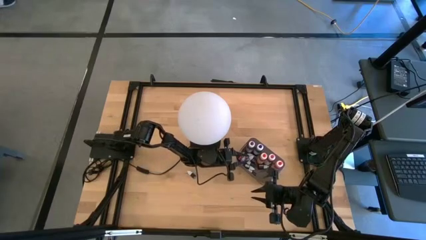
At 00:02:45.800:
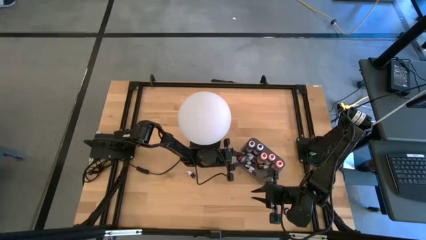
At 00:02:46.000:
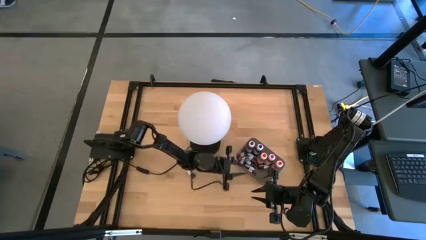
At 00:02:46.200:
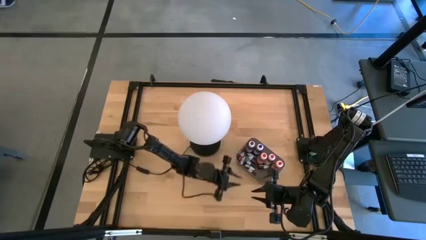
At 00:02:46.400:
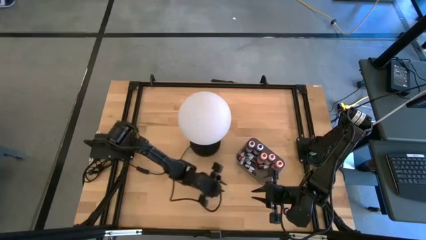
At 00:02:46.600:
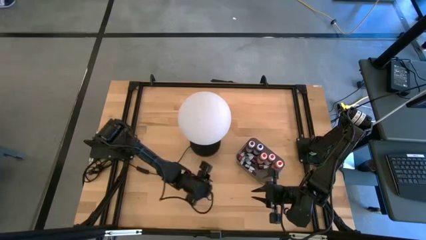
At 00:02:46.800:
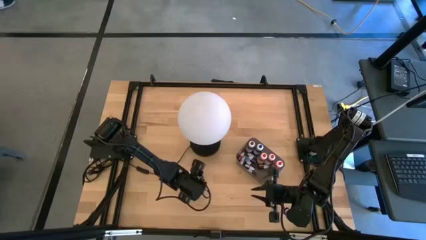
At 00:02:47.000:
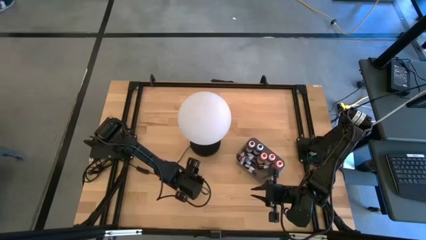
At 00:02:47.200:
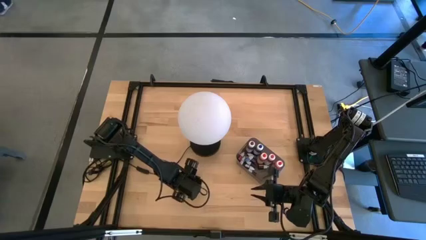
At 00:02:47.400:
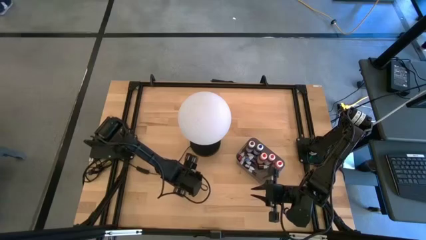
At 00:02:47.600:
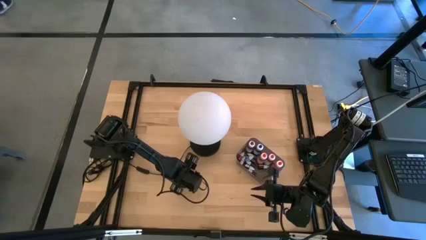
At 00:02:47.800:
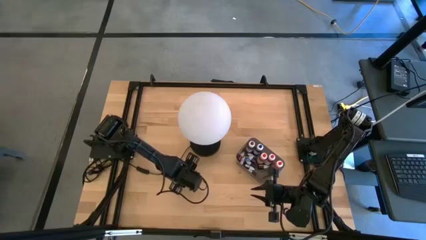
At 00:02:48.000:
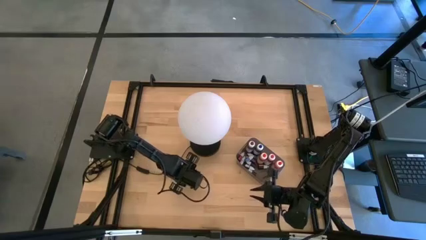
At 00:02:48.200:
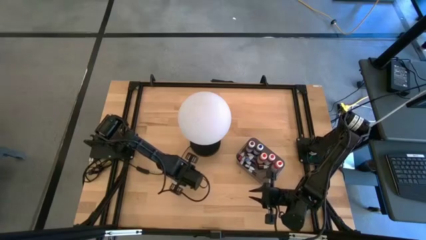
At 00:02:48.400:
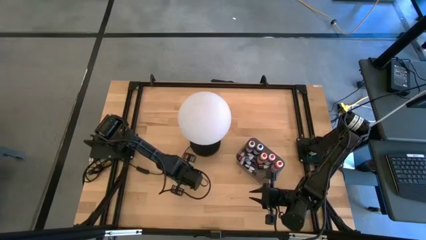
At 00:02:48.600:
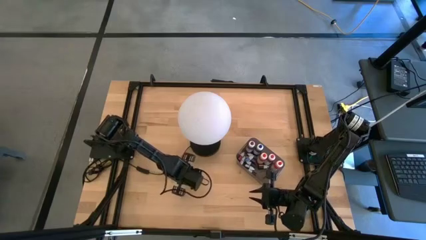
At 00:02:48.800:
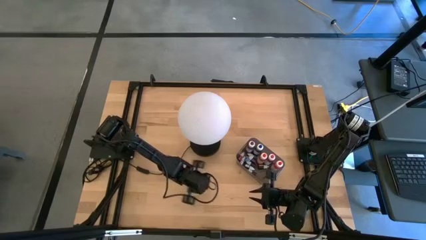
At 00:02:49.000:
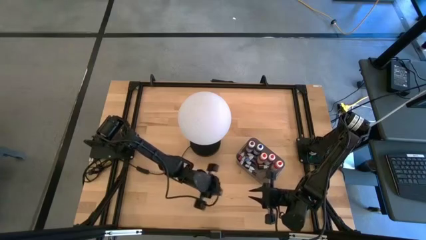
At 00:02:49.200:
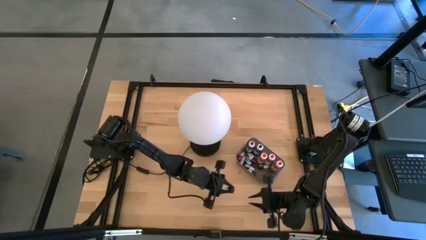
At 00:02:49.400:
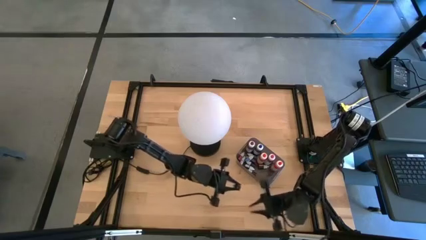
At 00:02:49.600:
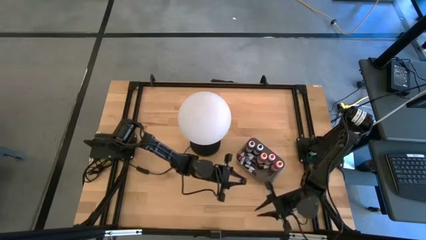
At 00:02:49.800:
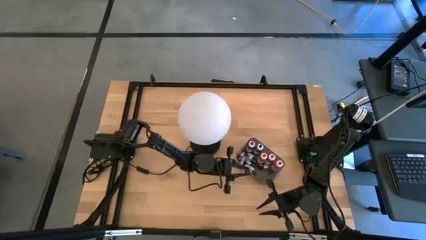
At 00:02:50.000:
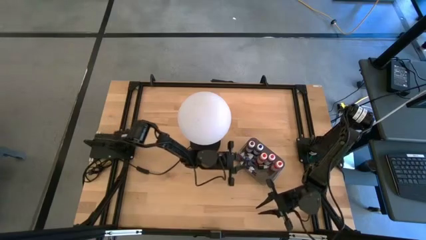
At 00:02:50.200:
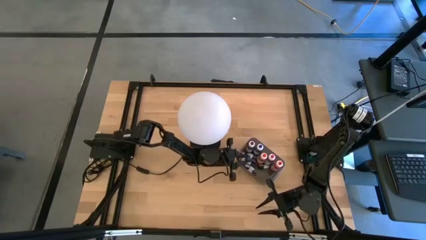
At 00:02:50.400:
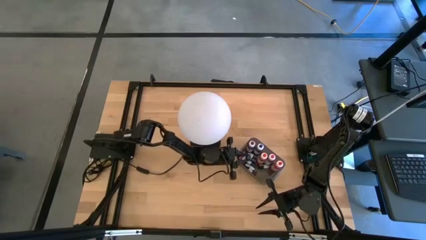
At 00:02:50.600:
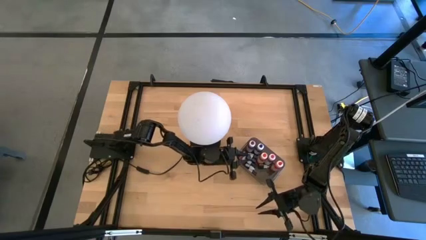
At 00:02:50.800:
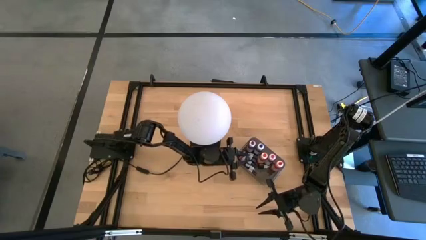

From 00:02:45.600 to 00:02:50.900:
Task: Pick & Place food coloring
Put the small green food coloring bottle into the black container

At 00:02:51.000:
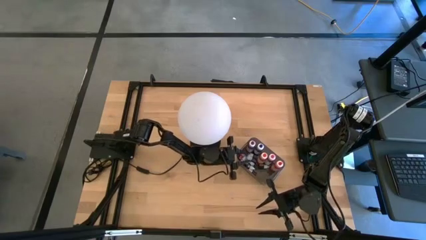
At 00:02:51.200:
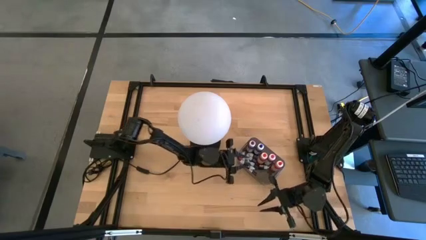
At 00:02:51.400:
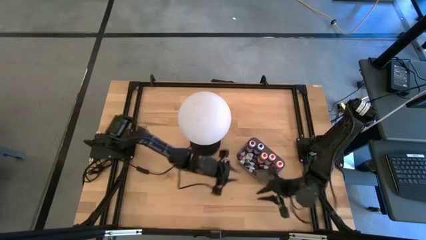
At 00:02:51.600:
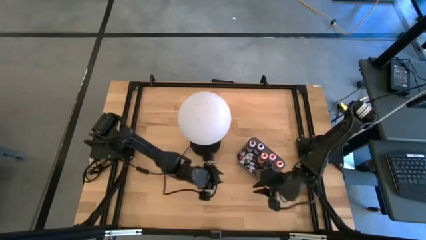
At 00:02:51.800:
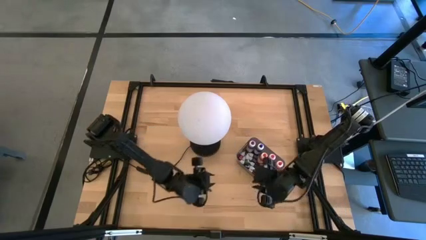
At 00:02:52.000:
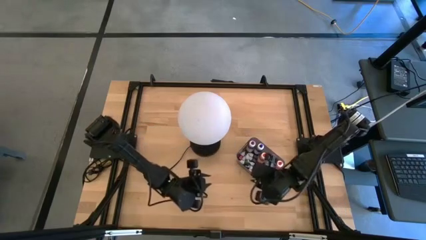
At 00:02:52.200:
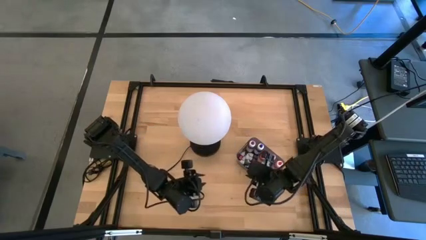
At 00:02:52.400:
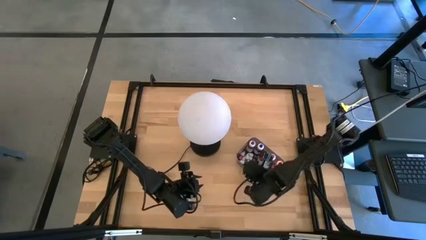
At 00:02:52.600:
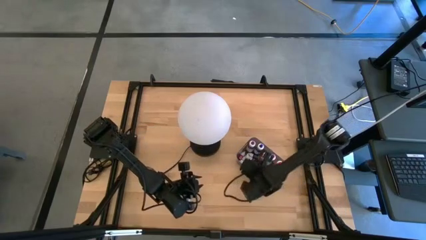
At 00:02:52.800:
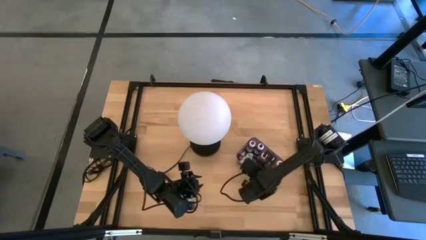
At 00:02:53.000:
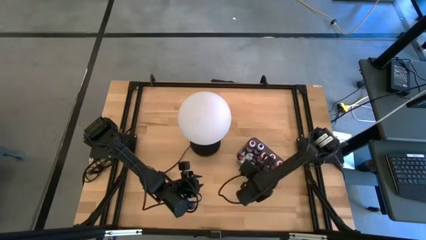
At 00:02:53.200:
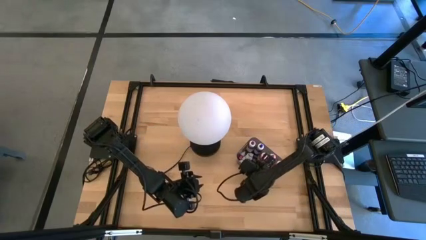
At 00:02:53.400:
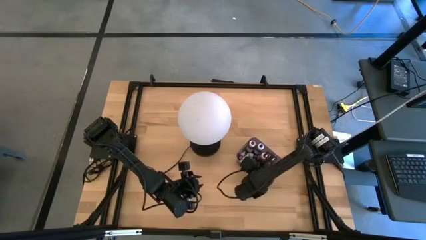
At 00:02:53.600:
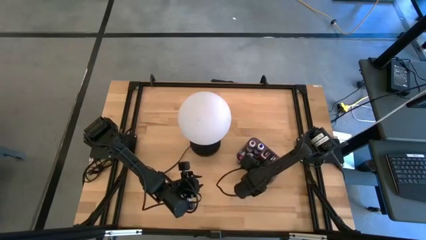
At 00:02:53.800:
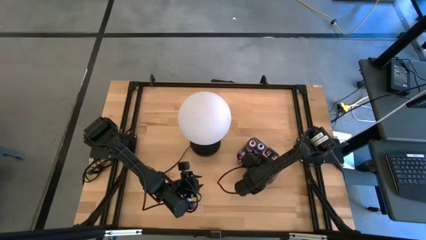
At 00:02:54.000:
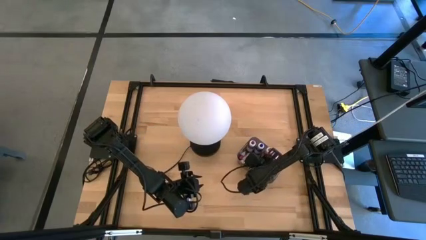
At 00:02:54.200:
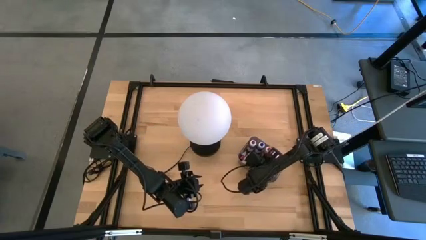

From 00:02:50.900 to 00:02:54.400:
Adjust the large orange food coloring bottle in the black container

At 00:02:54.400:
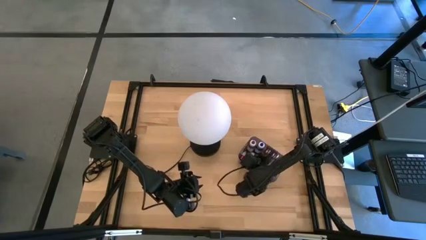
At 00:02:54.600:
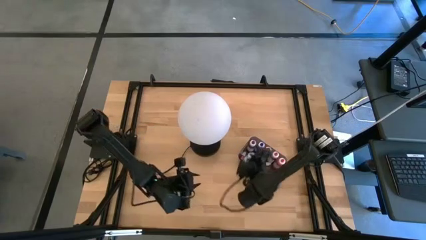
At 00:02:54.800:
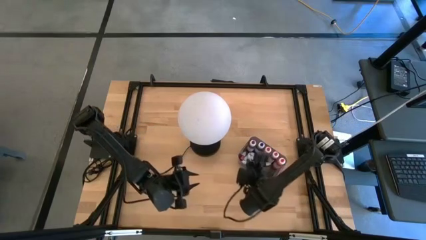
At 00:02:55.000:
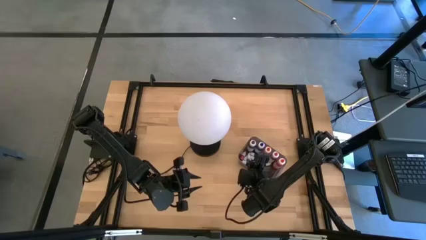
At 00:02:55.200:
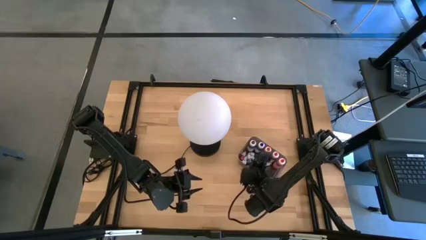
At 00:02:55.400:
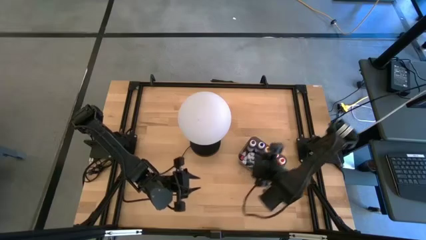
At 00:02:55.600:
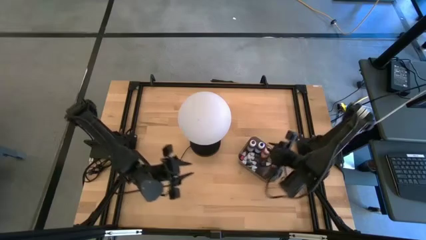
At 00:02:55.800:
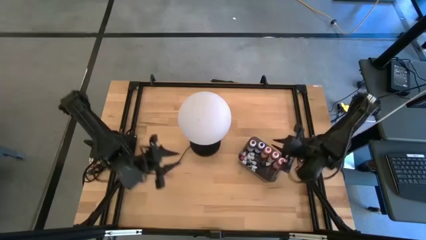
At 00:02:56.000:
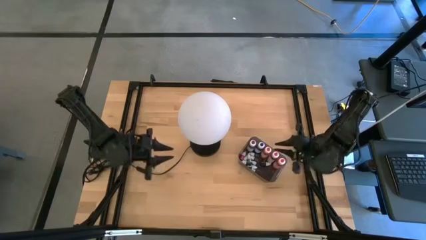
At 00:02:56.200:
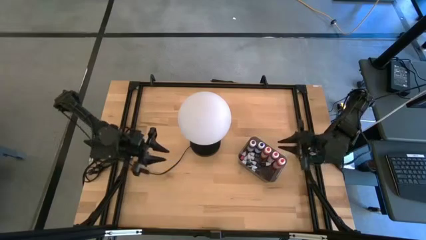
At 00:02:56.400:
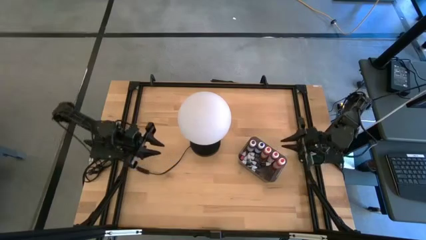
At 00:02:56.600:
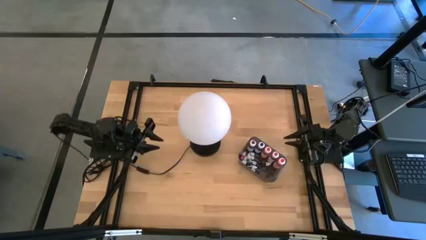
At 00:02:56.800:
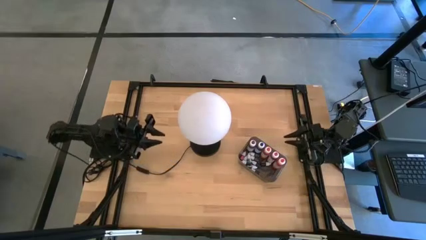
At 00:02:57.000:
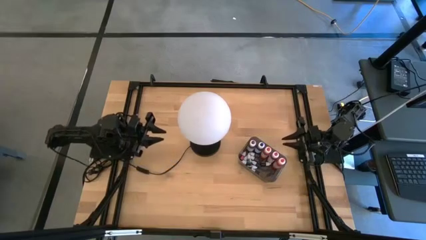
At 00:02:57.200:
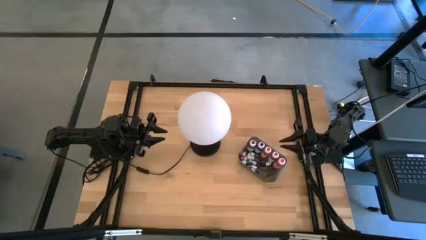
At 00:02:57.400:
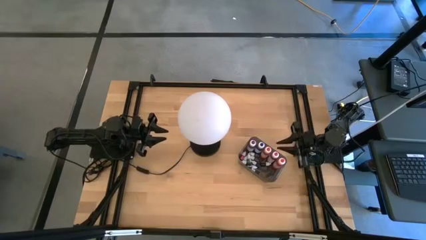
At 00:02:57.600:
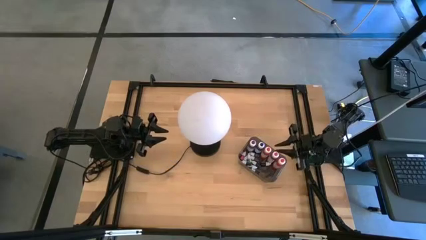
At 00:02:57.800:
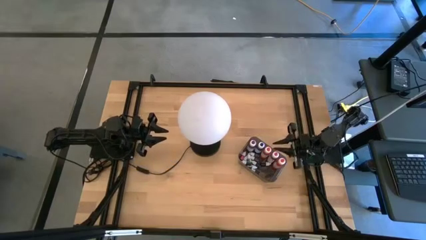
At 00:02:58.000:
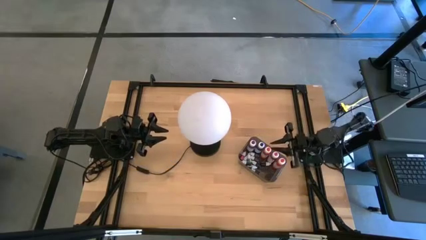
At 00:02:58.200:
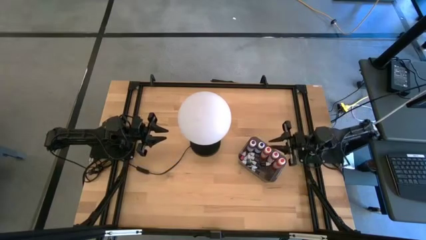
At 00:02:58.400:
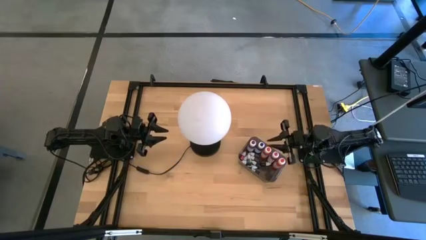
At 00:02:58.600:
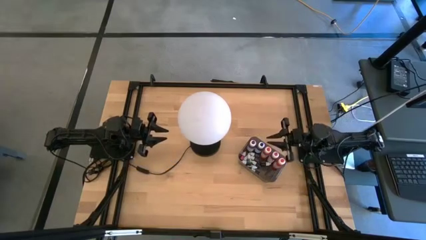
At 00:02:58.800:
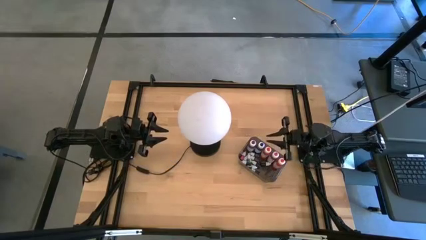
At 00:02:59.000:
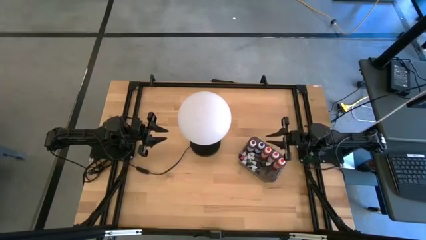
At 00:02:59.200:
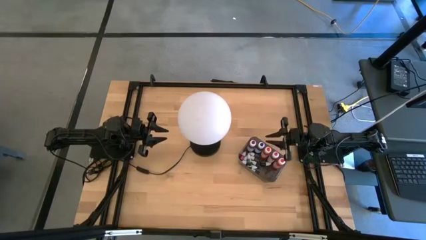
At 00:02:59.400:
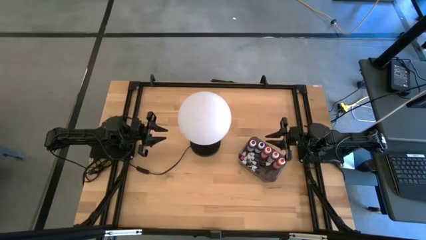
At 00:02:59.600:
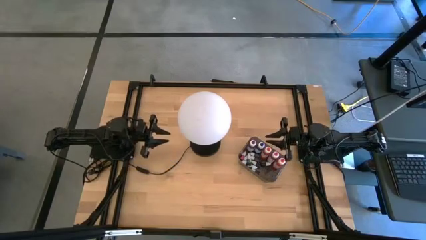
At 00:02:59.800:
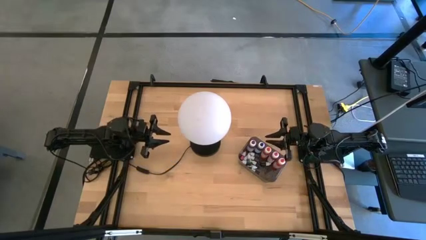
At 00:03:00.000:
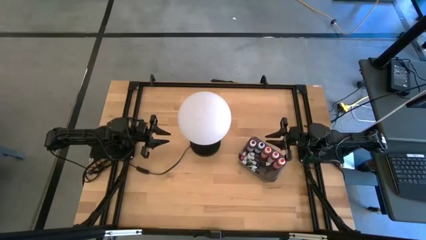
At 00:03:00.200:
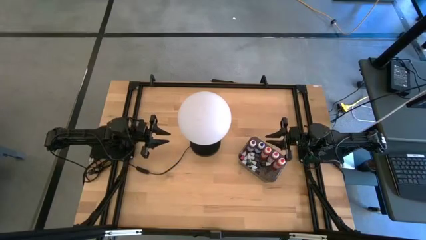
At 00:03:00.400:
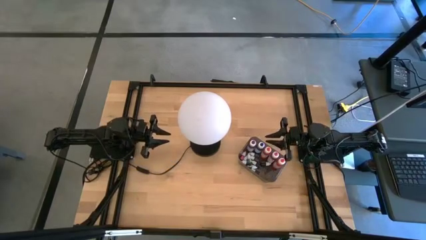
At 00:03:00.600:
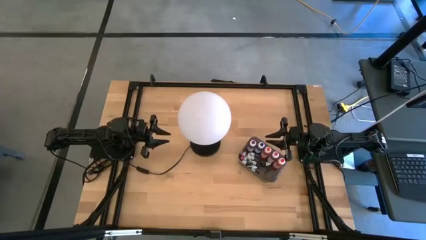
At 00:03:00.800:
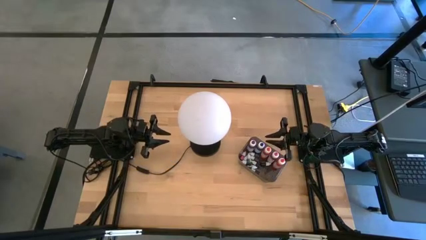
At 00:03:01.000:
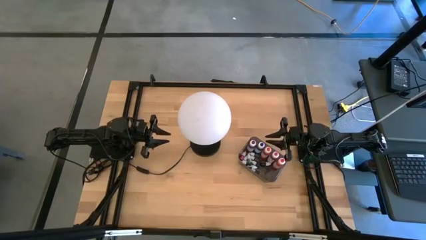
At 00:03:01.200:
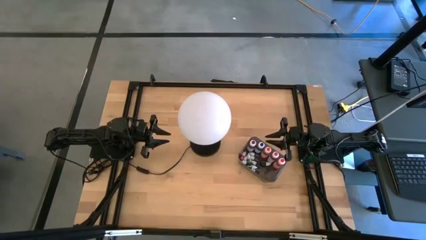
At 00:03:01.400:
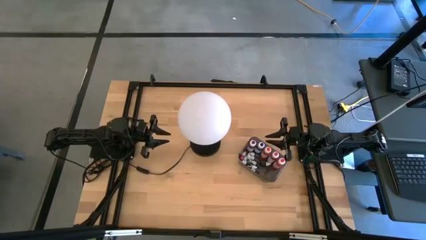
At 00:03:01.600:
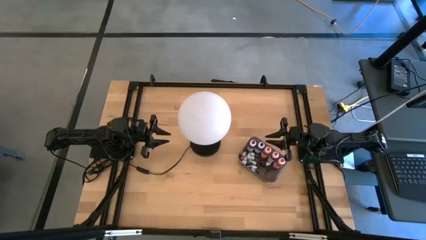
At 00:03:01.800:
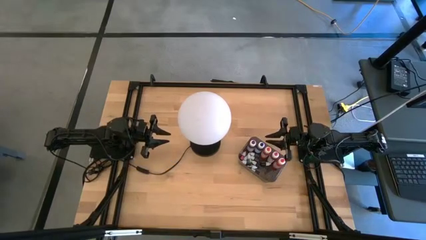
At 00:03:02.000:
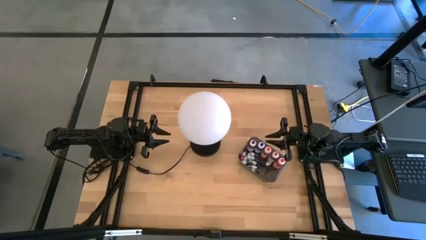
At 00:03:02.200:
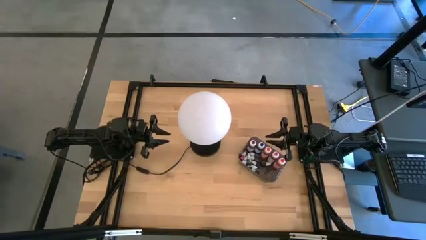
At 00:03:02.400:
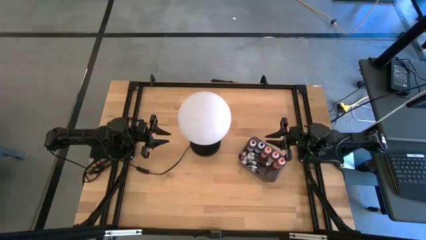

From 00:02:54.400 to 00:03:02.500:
Return to Home Position
